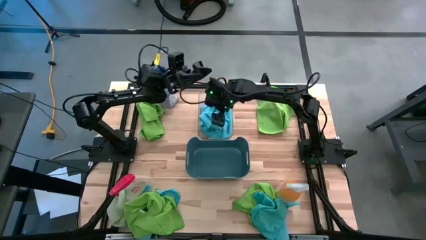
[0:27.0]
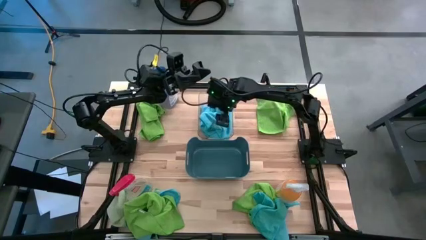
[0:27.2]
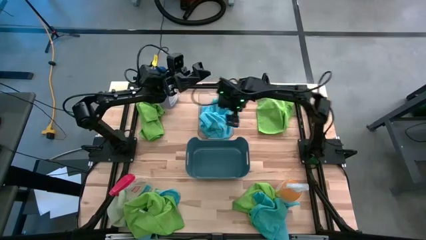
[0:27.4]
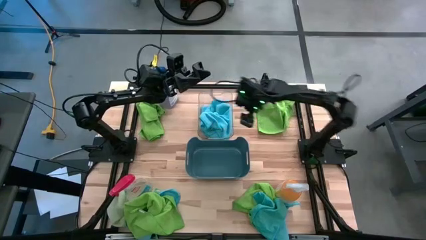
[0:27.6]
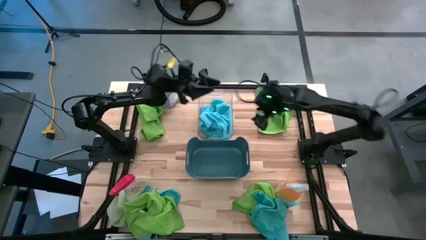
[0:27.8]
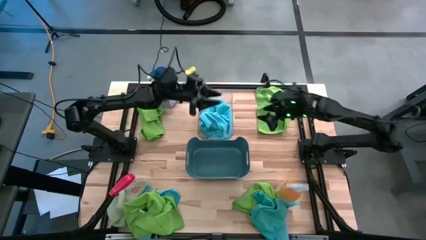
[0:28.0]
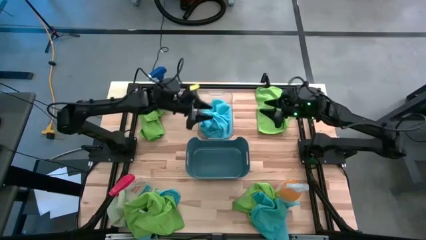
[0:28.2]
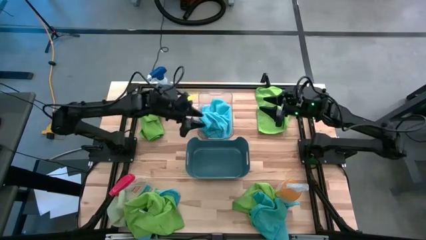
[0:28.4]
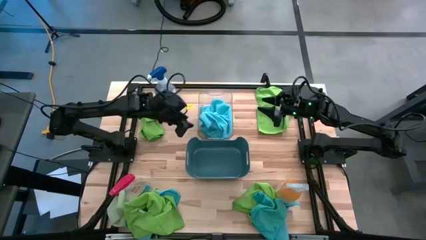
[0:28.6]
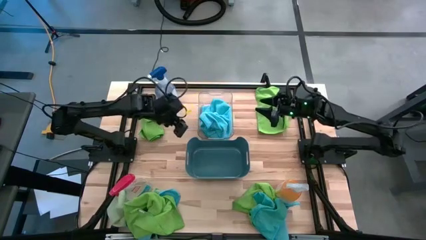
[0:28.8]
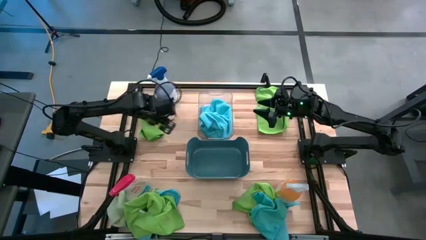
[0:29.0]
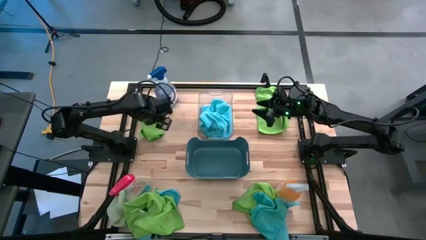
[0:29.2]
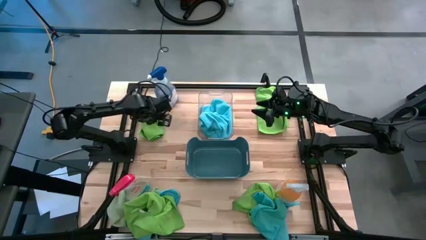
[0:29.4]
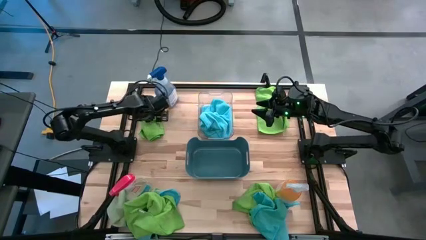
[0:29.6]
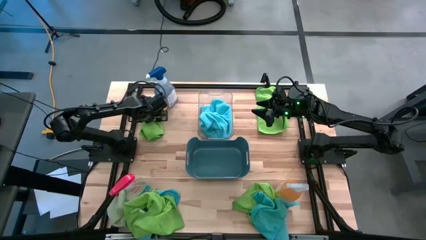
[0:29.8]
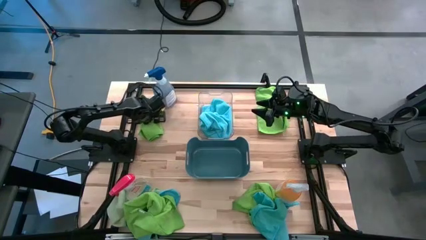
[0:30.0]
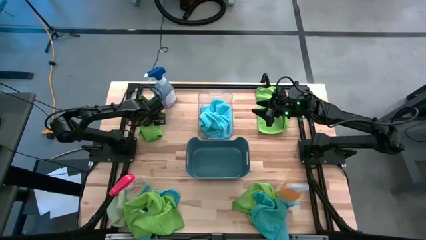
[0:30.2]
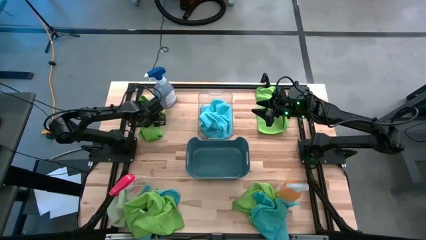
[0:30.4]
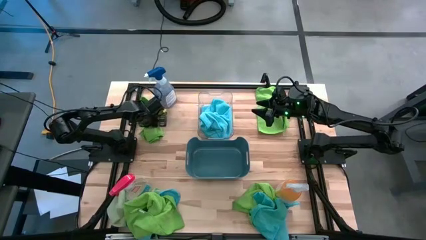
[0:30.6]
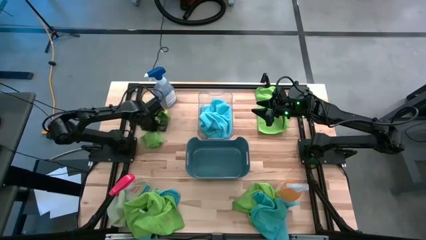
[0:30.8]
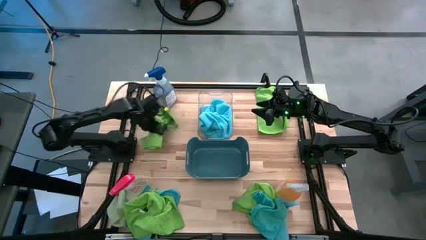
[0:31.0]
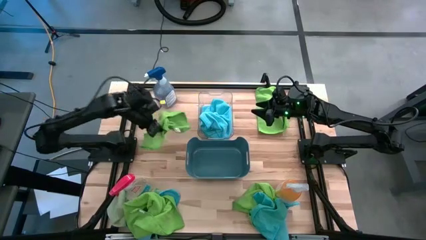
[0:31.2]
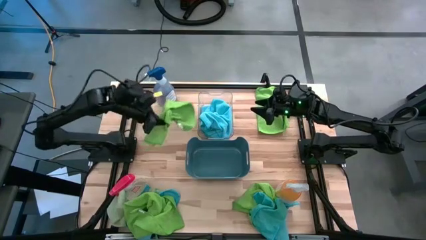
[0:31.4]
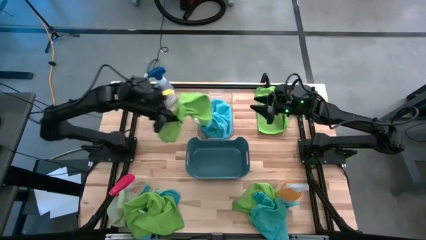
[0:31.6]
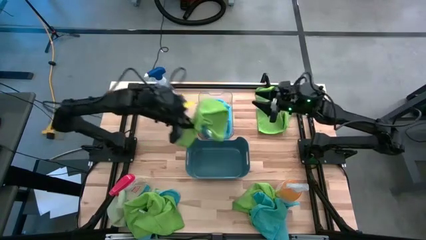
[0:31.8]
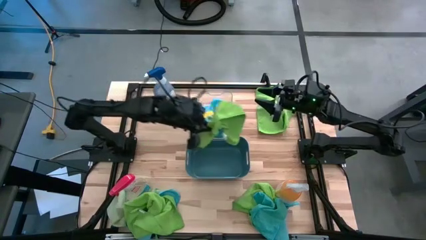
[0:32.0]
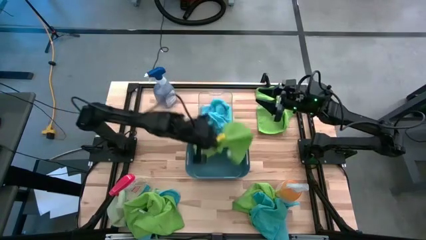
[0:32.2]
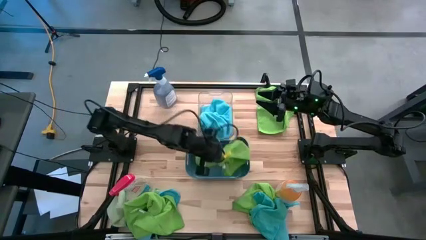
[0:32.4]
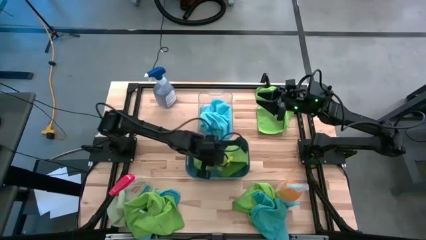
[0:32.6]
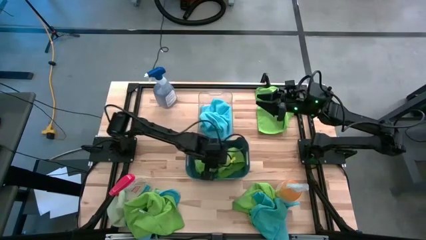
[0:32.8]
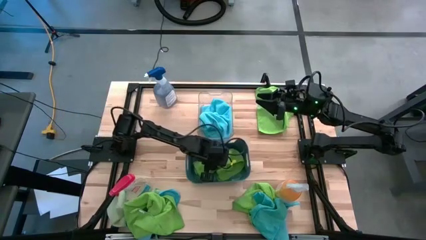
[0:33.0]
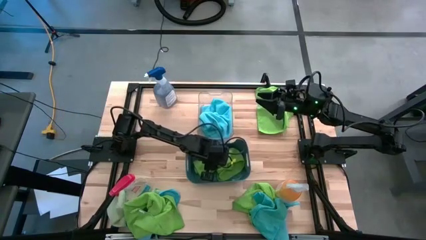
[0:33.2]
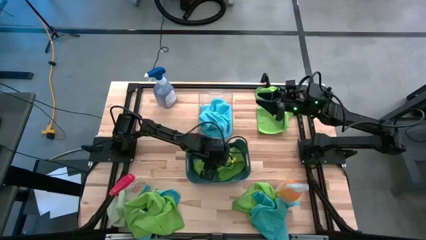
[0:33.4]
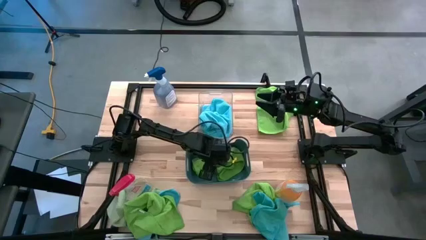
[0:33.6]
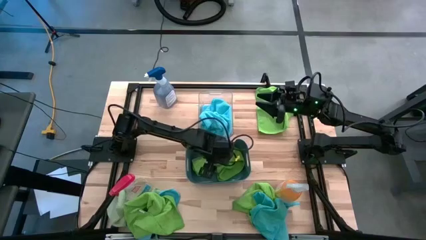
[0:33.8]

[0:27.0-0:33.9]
Task: Sort microfiber towel by color & place in baskets
Put the green microfiber towel into the blue bin

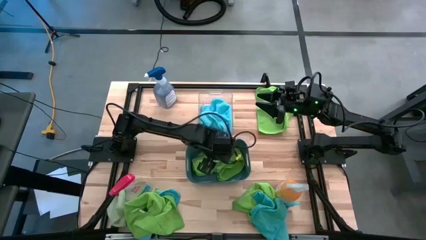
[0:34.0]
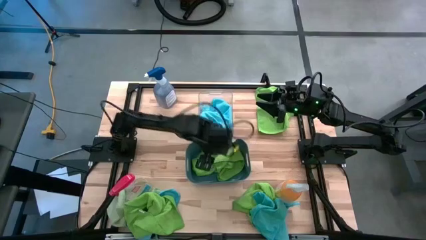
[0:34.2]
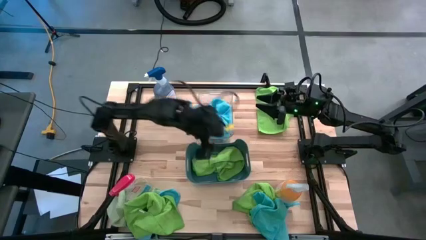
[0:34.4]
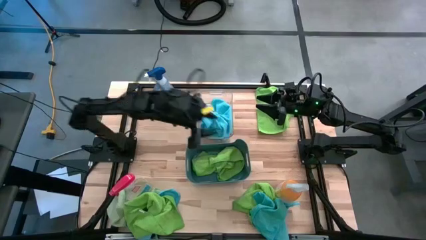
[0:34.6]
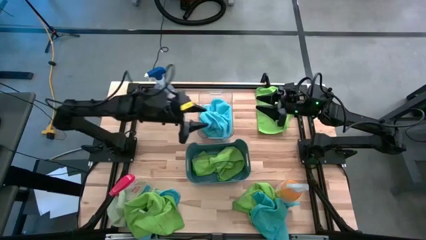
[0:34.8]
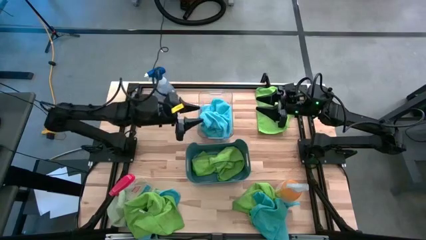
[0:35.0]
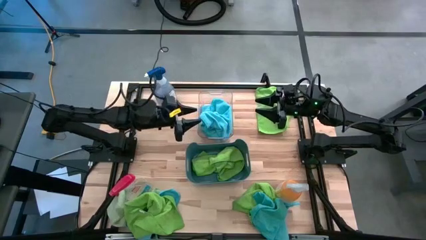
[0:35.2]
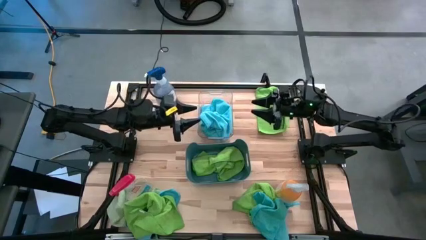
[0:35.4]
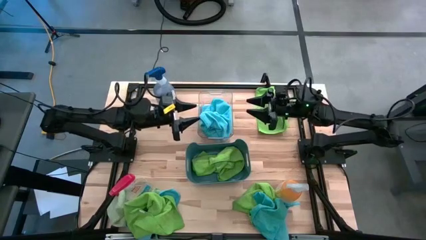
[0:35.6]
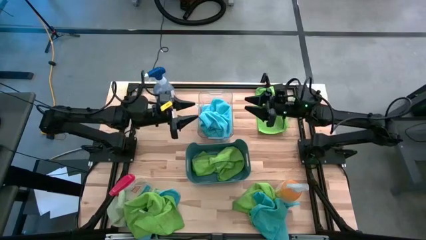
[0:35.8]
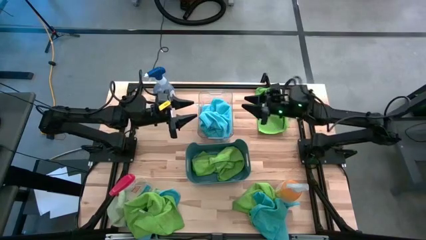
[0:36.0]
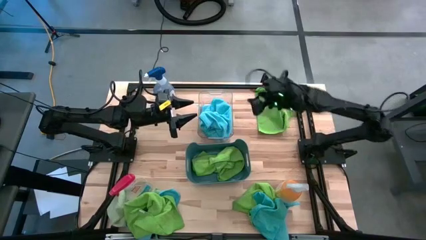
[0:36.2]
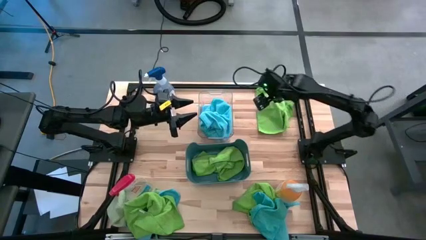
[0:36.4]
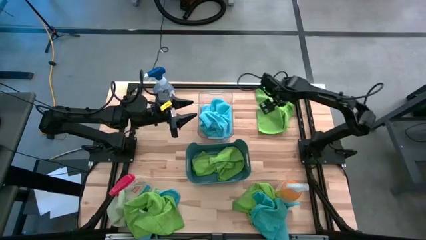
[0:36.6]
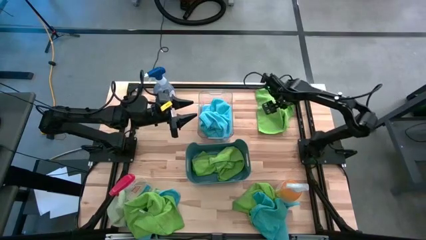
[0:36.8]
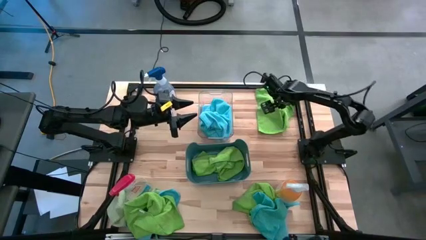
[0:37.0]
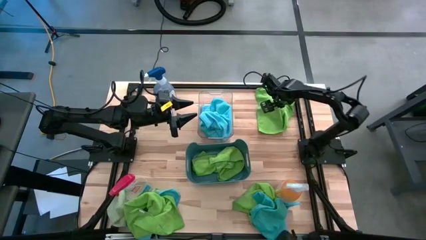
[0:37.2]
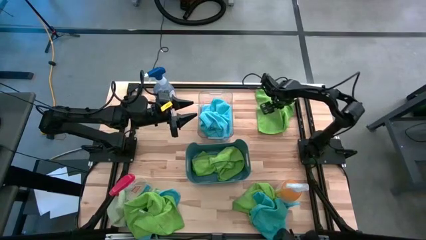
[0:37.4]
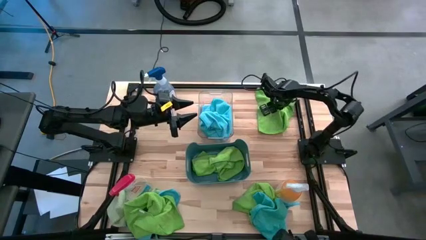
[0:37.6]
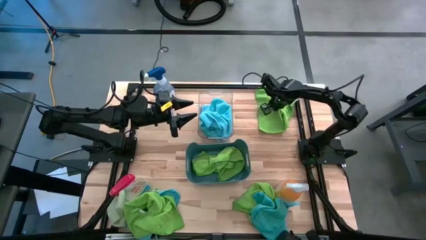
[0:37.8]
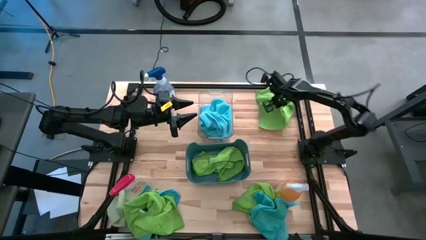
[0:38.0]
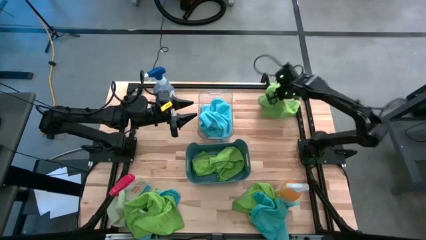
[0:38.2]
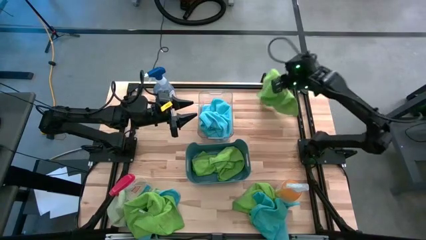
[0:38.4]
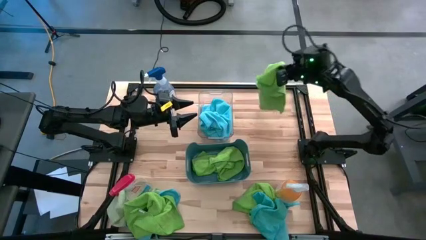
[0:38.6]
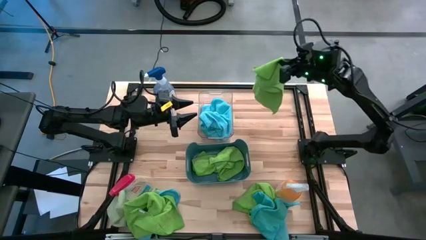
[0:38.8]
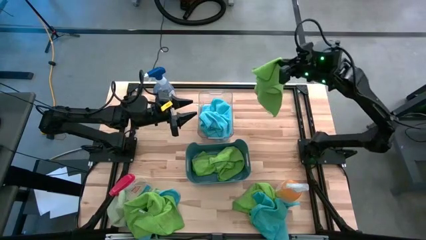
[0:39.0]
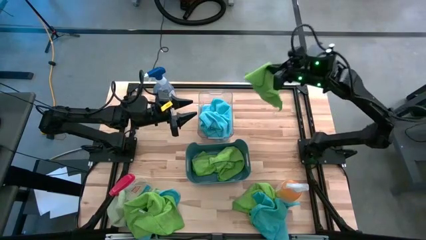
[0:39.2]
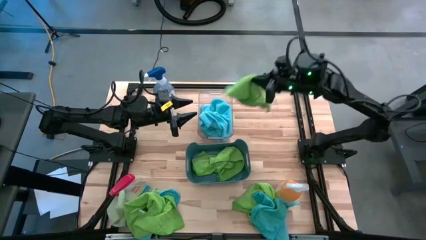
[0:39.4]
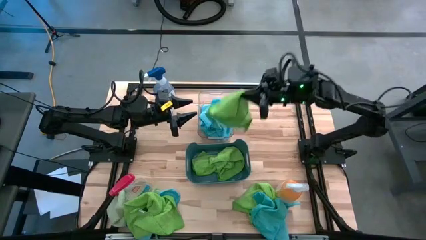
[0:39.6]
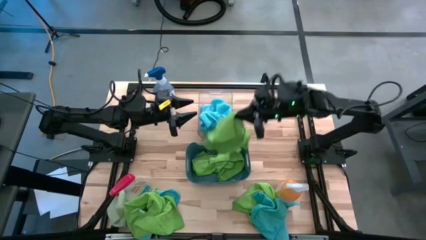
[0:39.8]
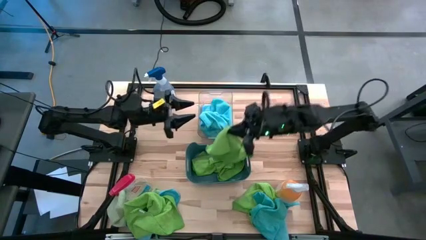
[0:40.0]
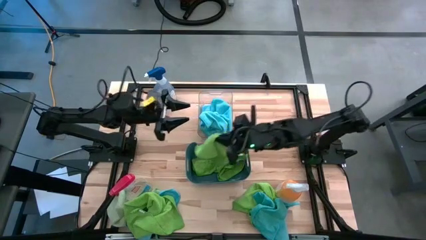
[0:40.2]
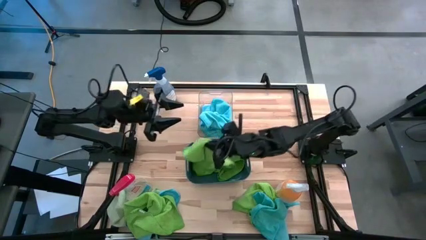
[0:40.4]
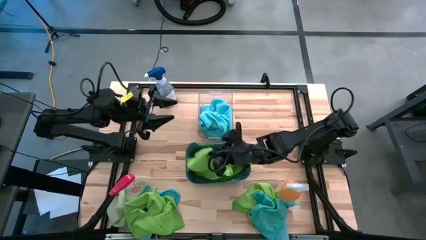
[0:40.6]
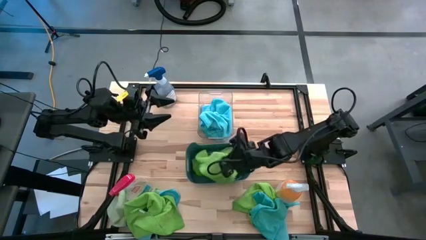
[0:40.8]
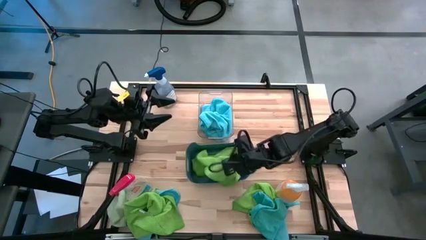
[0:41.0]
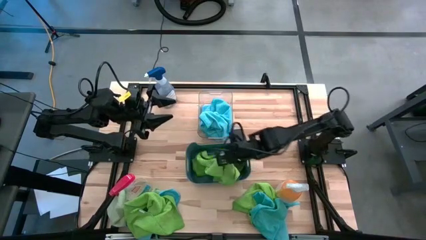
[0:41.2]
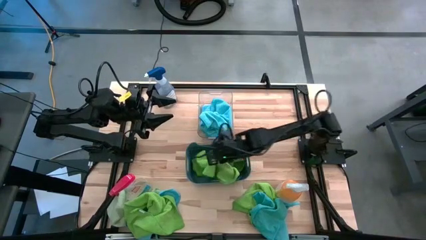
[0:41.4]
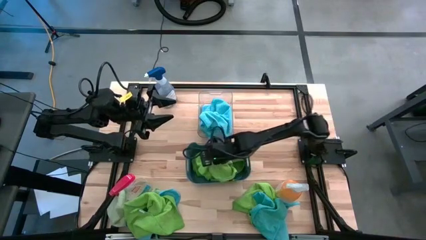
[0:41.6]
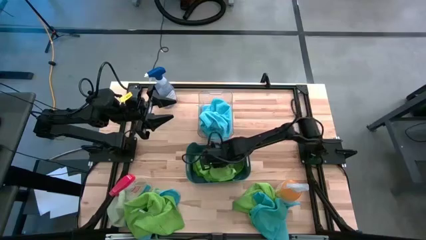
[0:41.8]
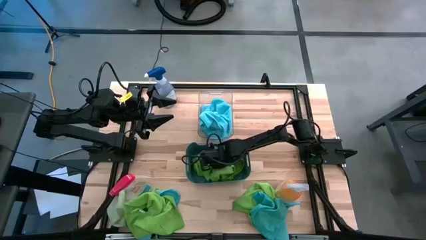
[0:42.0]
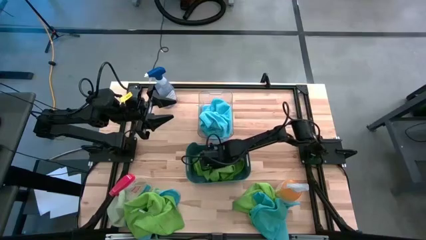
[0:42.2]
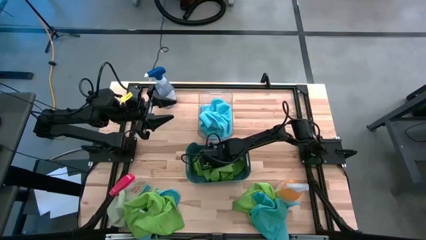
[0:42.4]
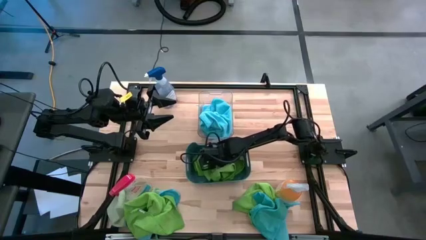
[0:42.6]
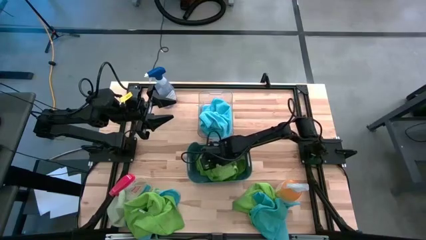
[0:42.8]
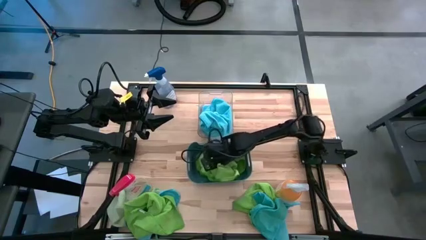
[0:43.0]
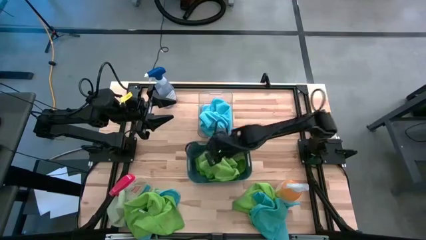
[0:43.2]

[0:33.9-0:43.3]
Put the green microfiber towel into the blue bin
